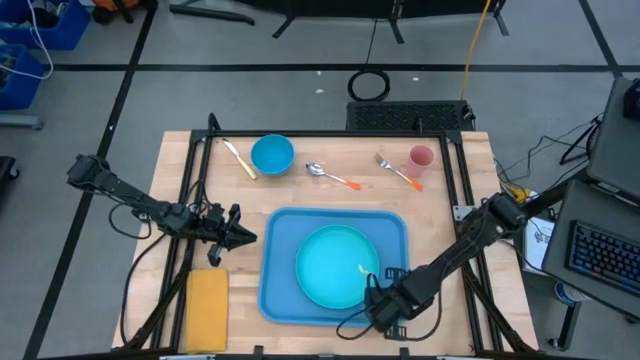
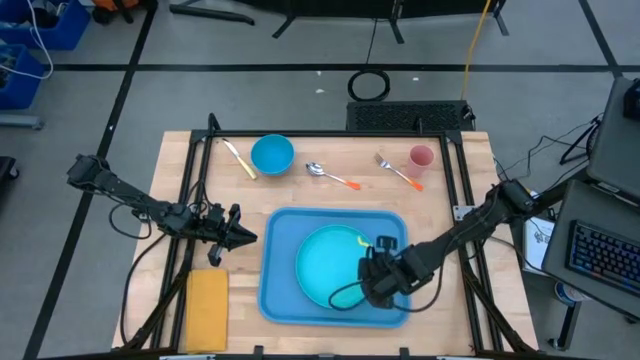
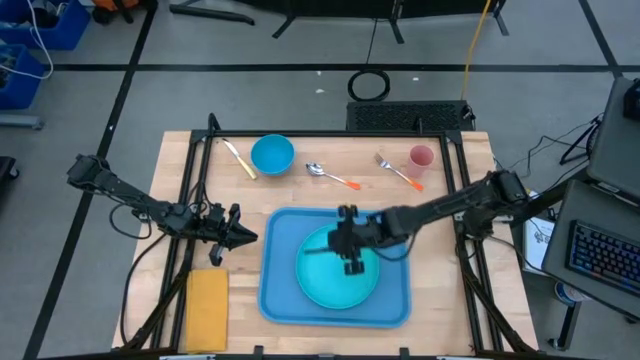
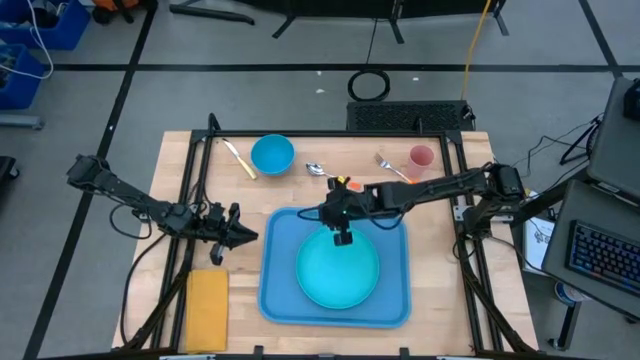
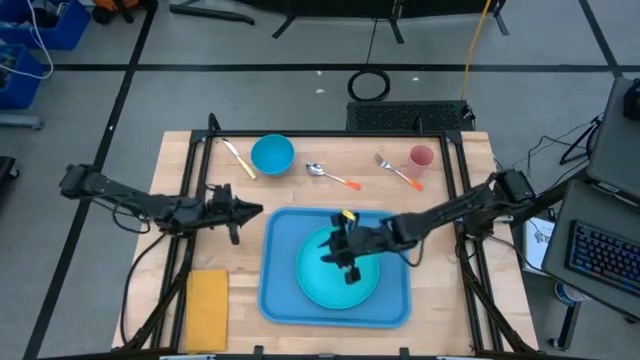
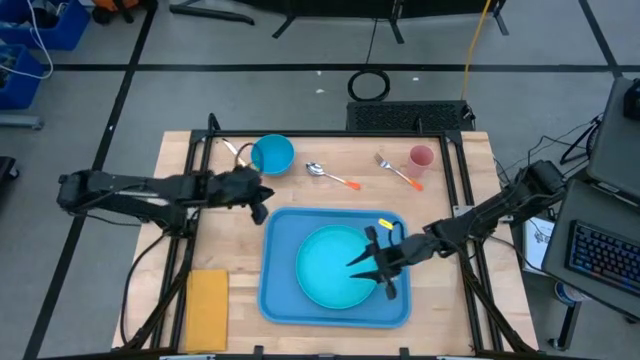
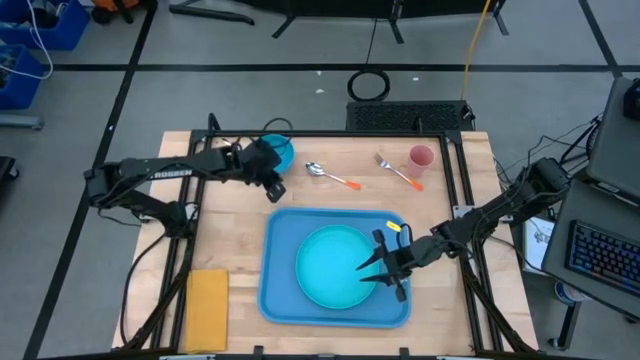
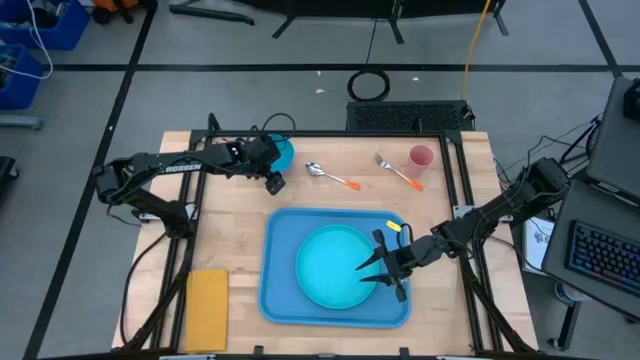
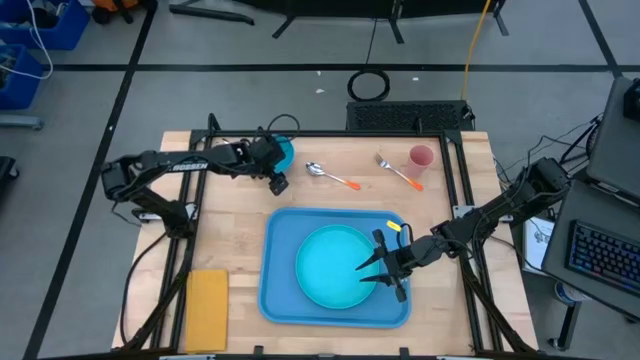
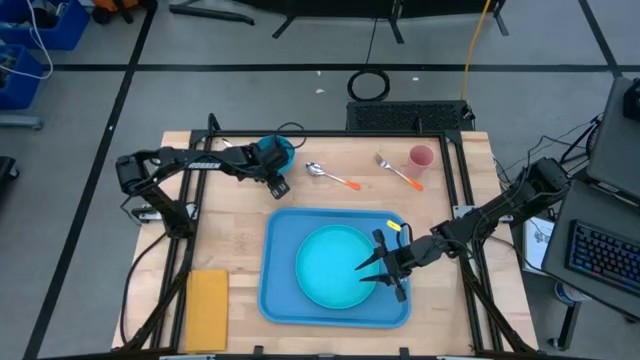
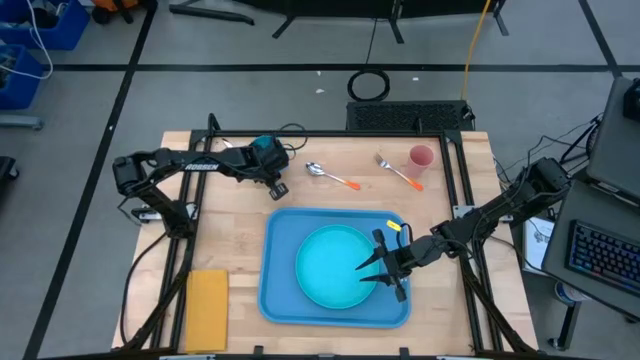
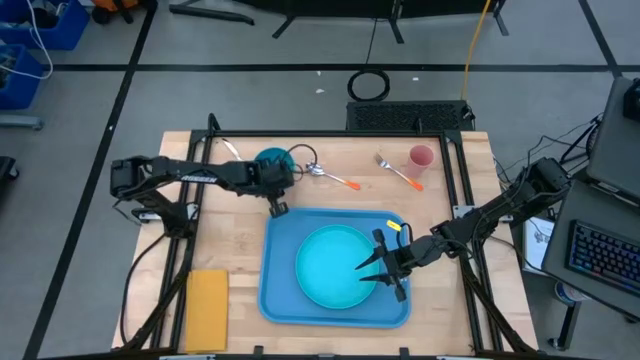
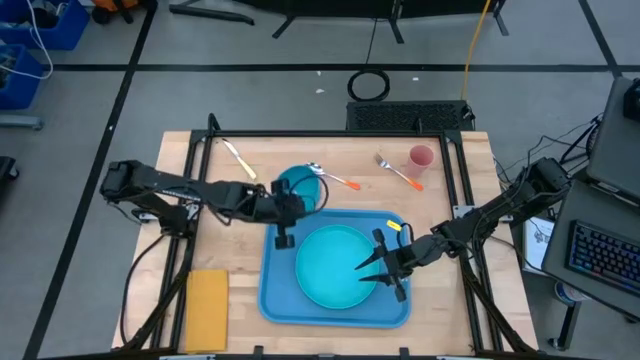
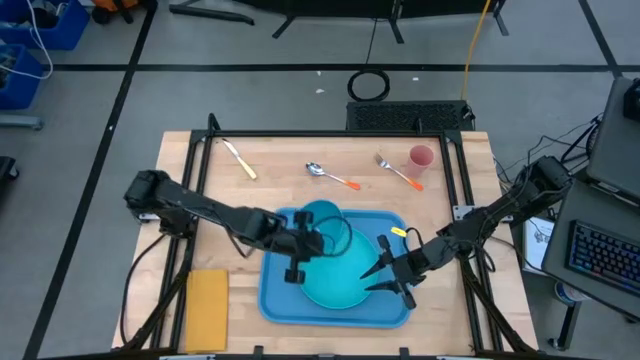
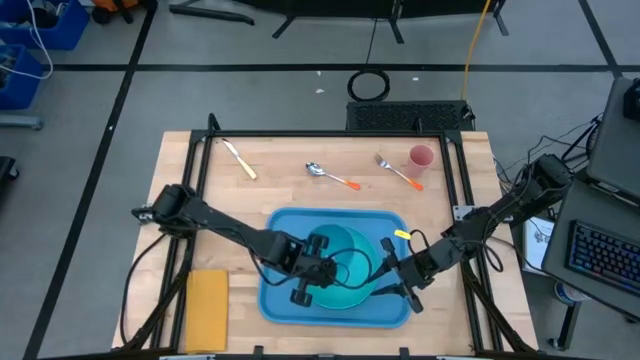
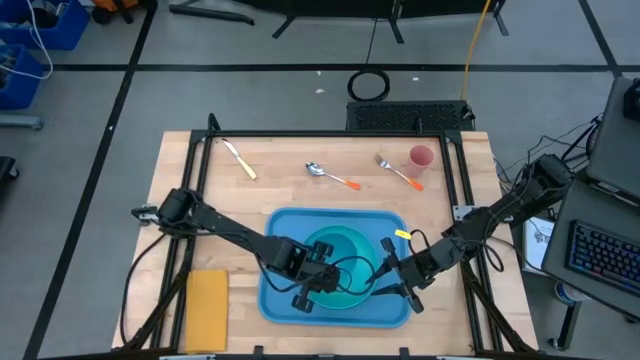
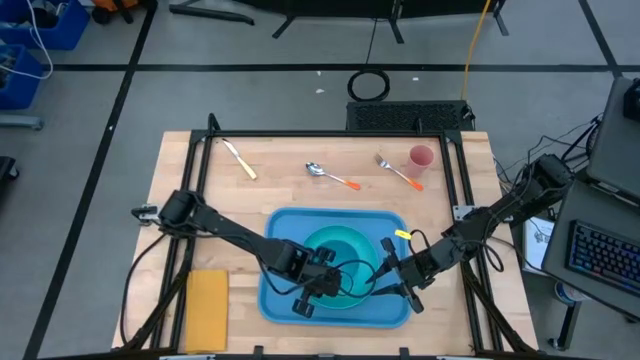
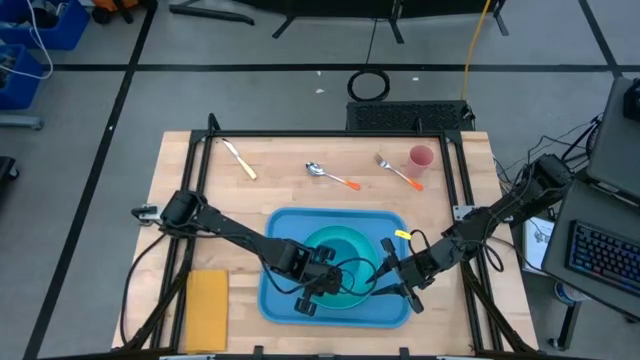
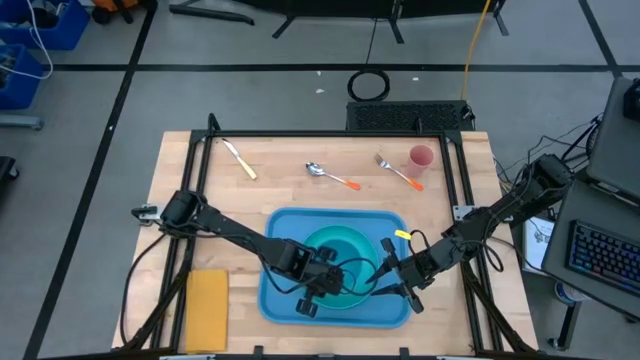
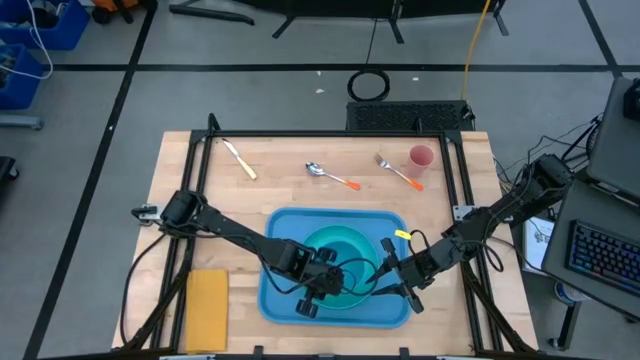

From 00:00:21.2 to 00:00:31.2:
Task: Set up tray
Put the blue bowl on the green plate

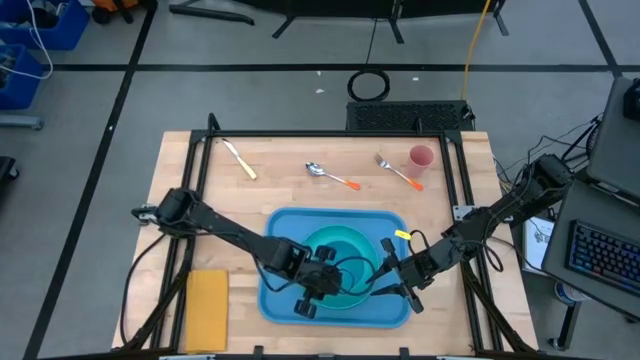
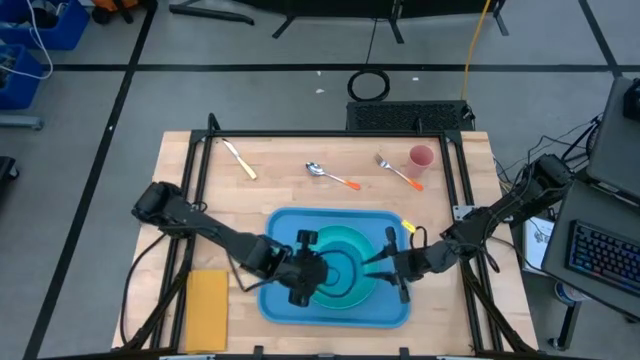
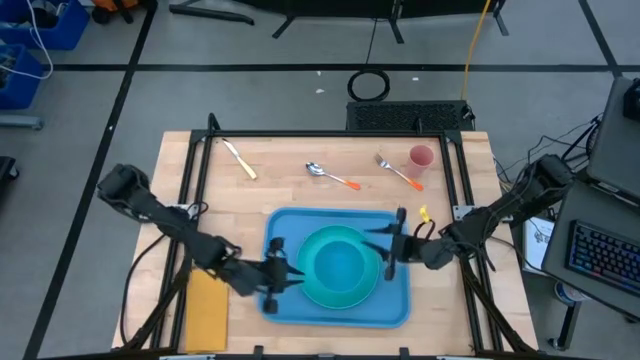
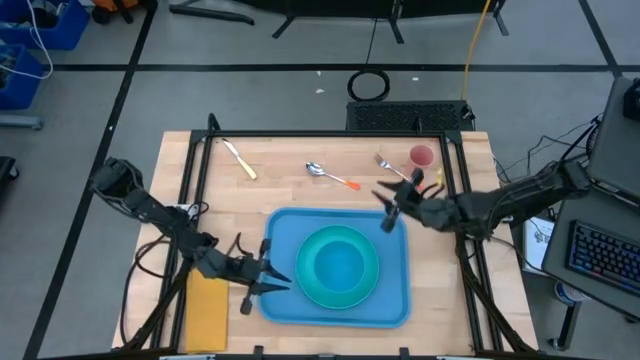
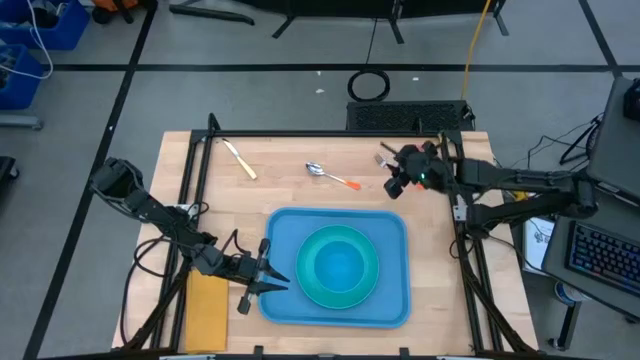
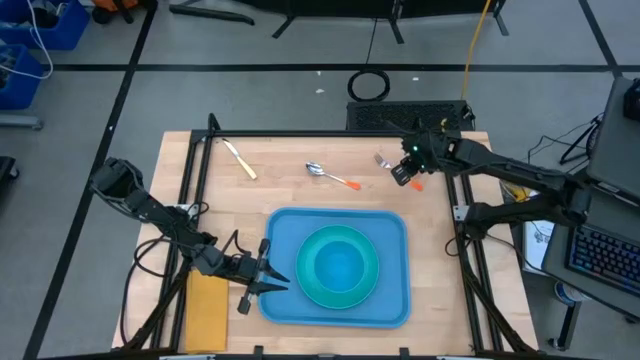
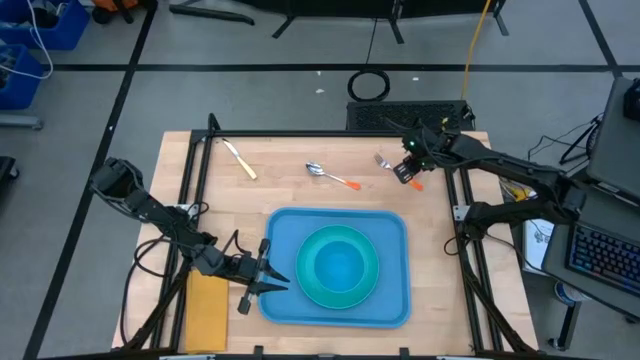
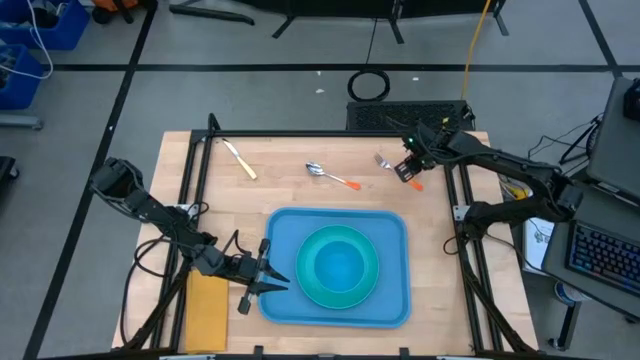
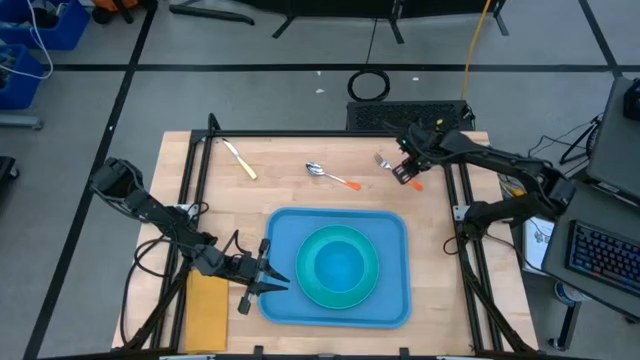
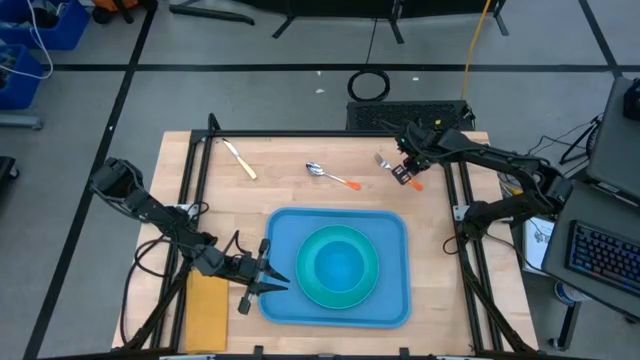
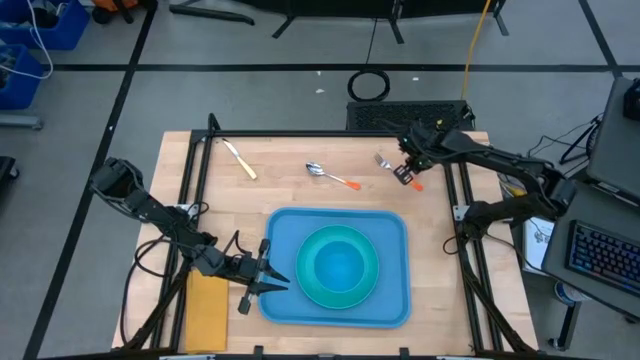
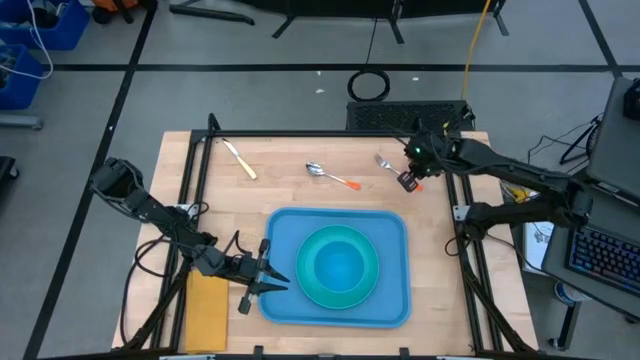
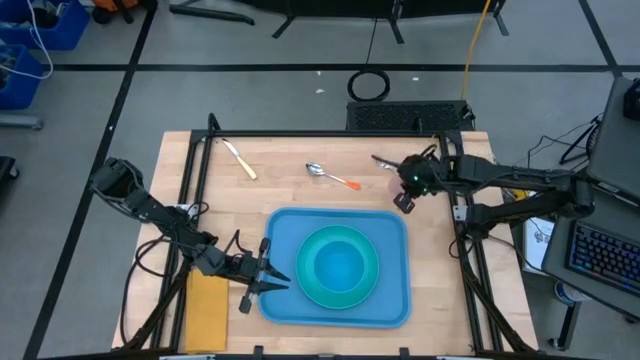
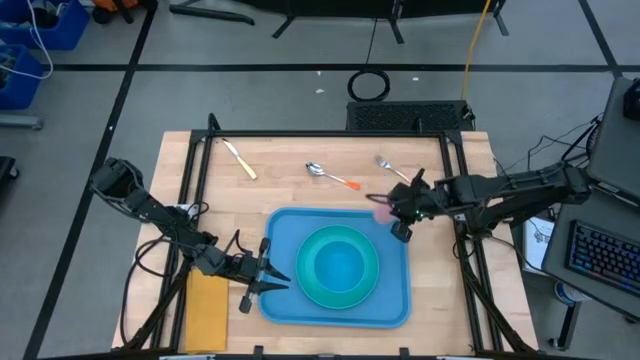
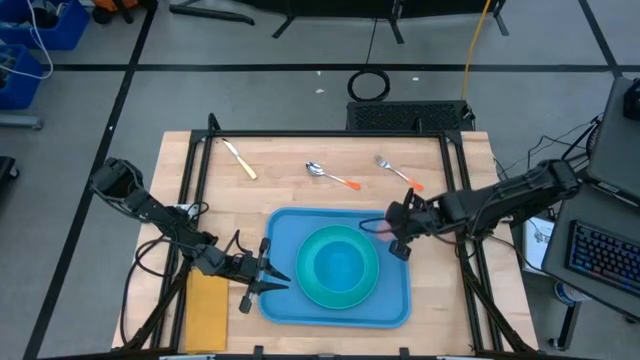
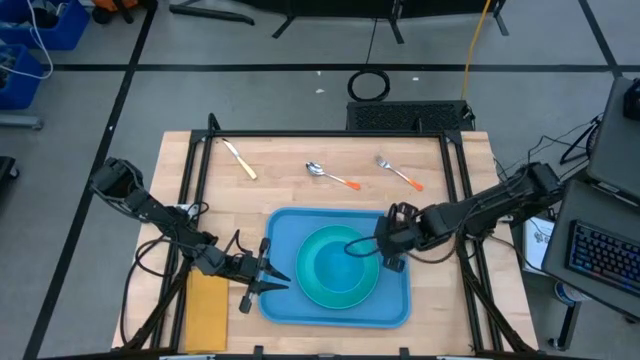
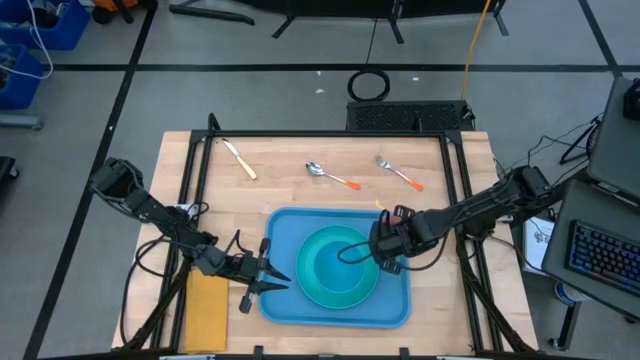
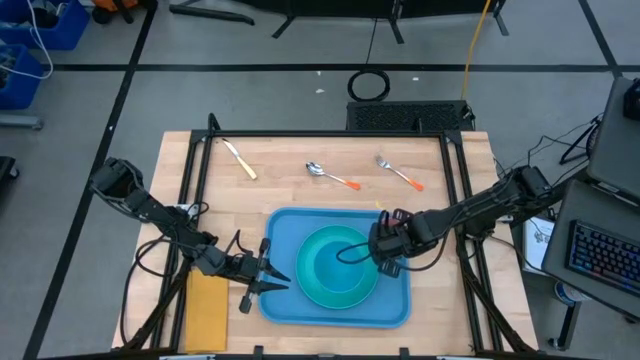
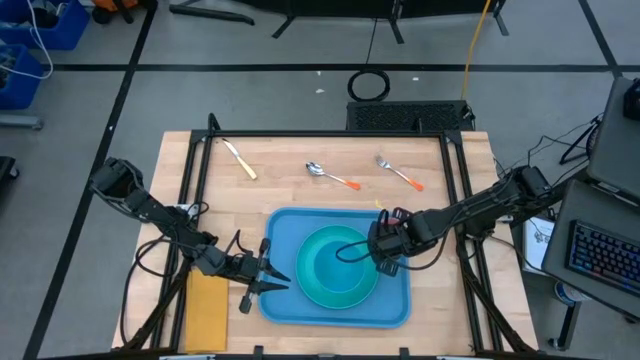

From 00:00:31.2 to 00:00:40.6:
Put the pink cup on the blue serving tray to the top right of the green plate

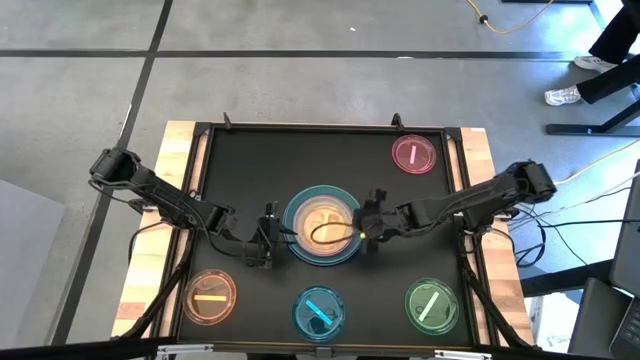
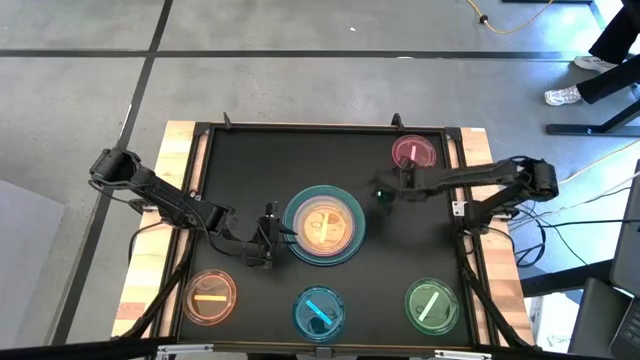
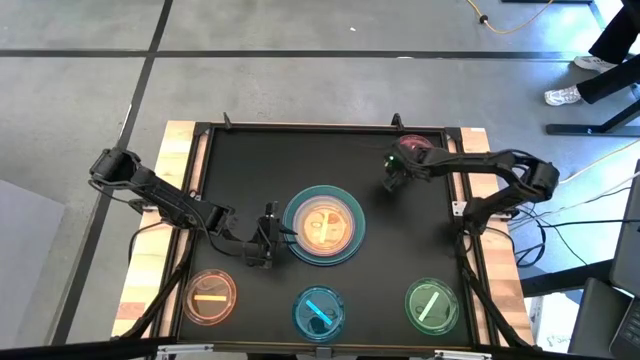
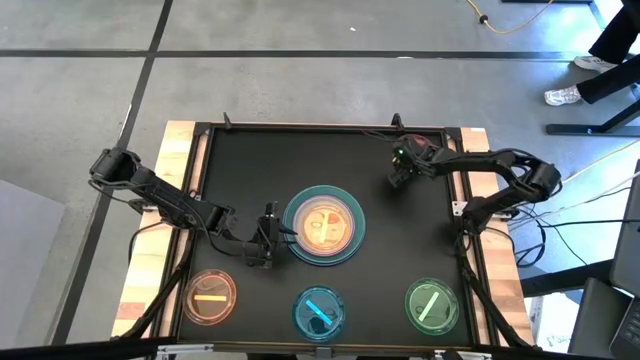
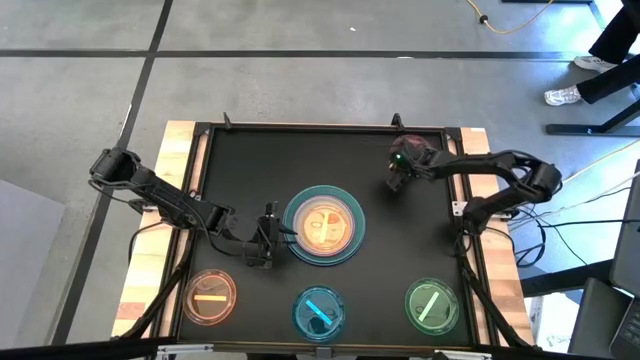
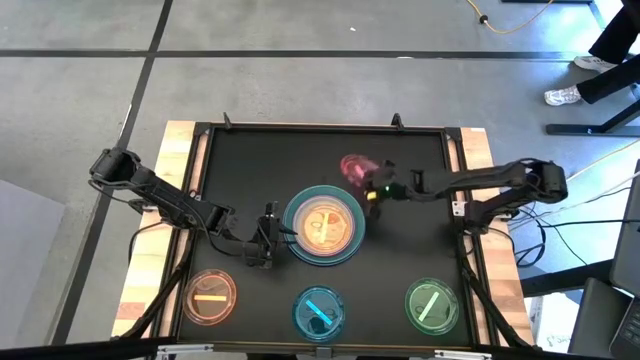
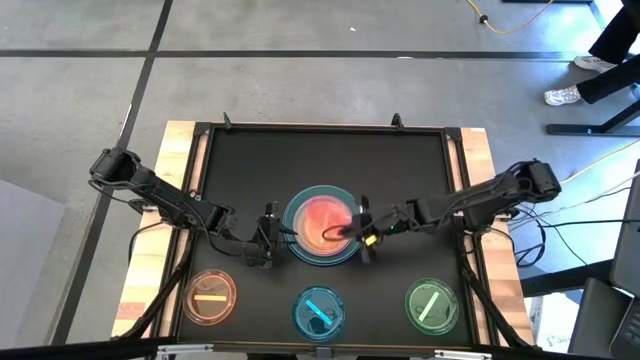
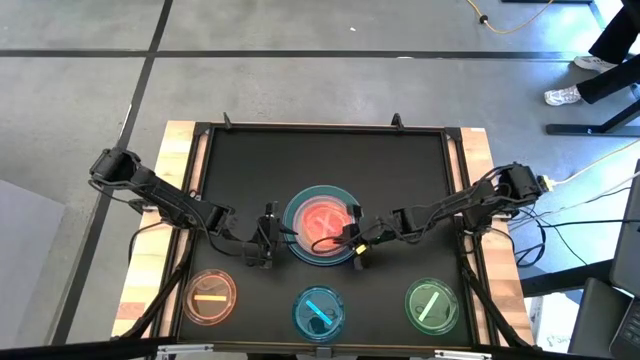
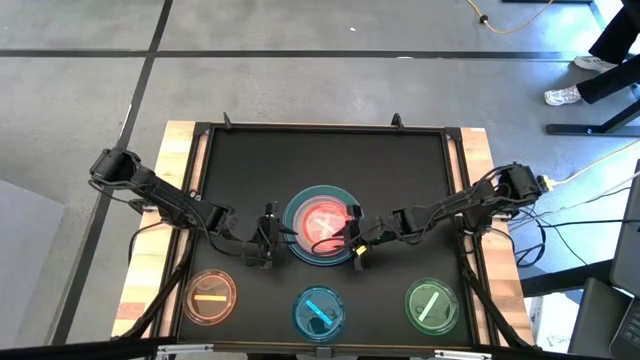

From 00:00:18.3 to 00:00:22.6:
Task: Stack plastic plates
Stack the light pink plate on top of the orange plate
